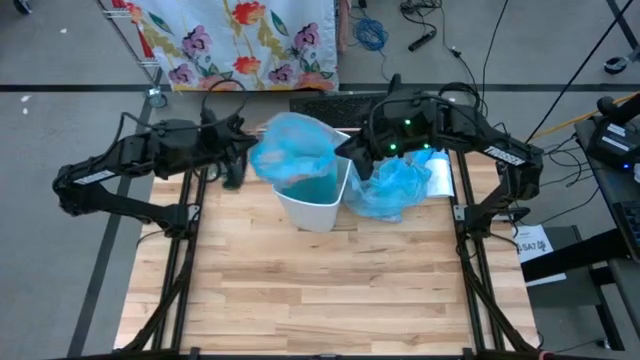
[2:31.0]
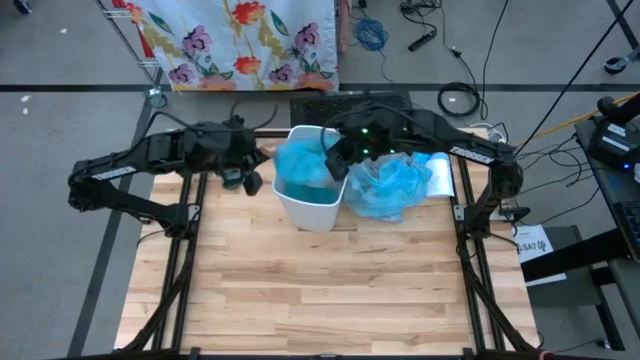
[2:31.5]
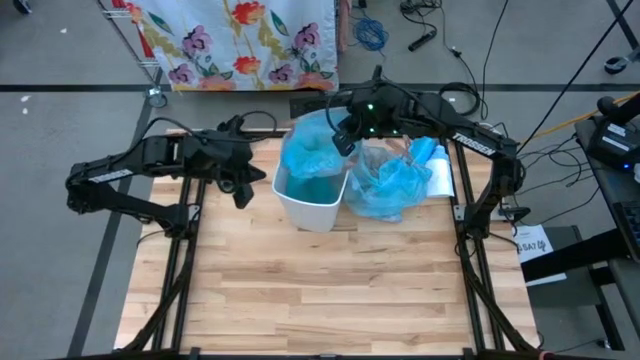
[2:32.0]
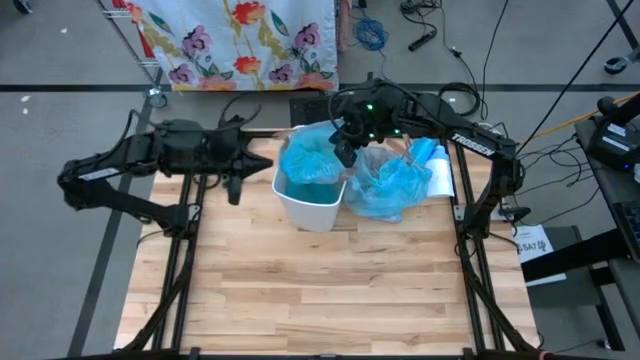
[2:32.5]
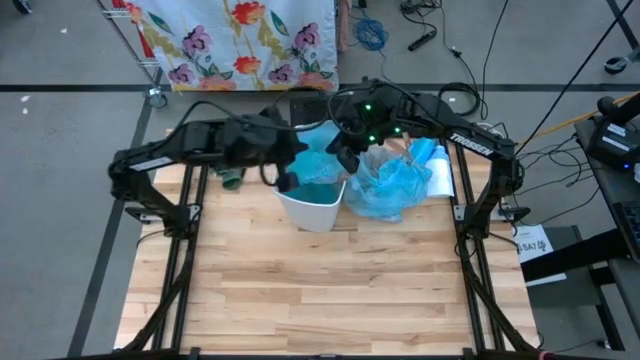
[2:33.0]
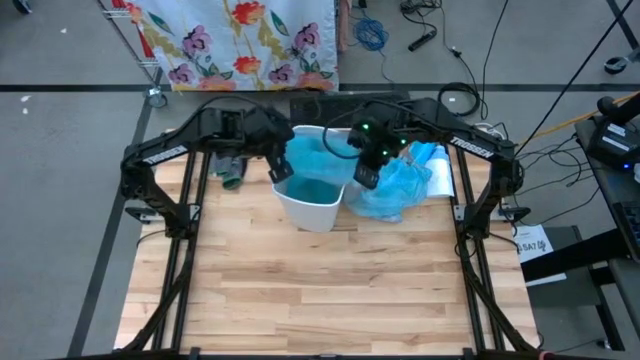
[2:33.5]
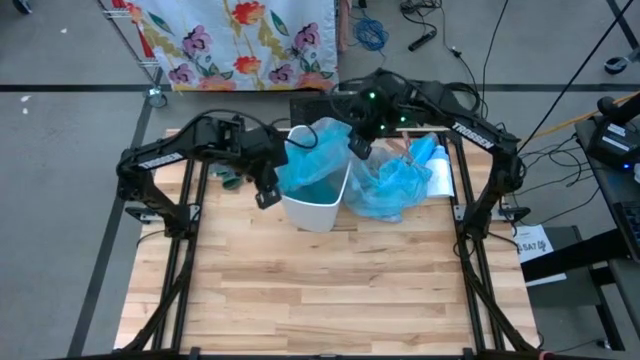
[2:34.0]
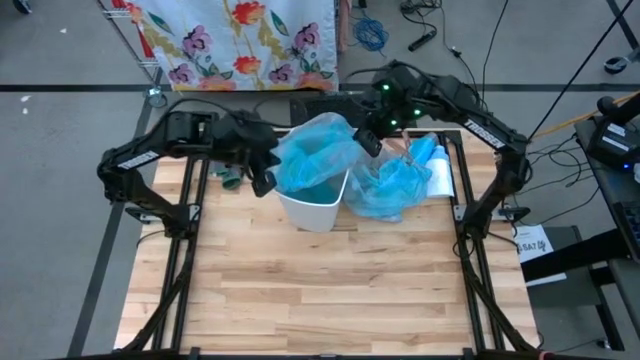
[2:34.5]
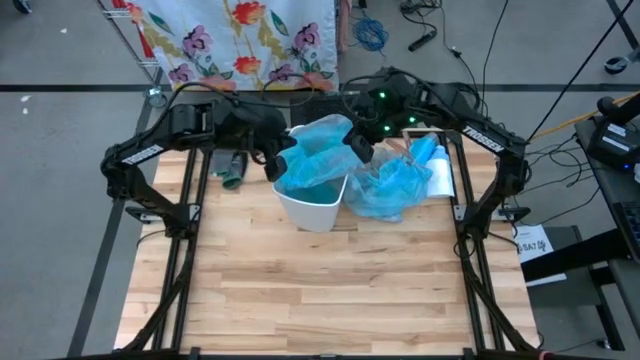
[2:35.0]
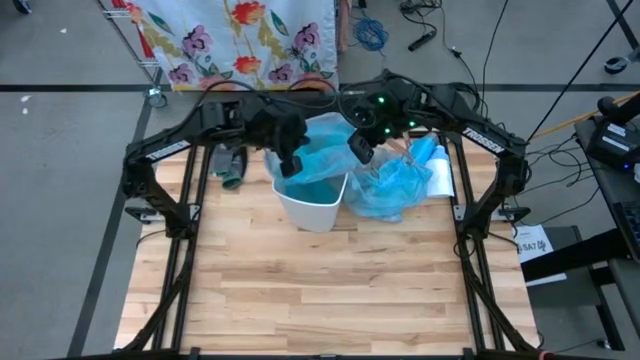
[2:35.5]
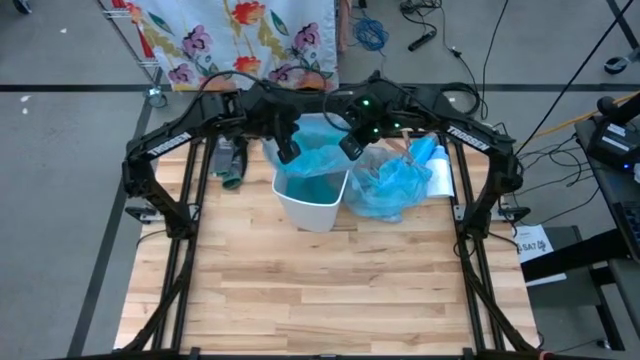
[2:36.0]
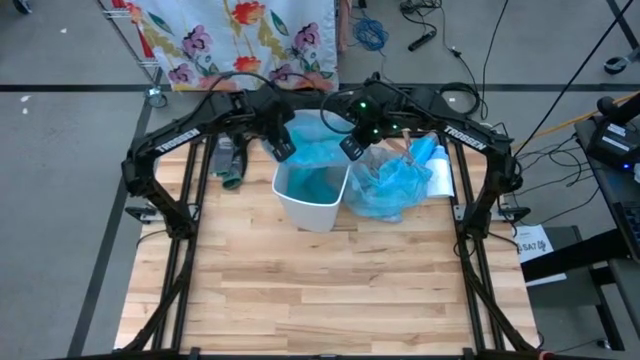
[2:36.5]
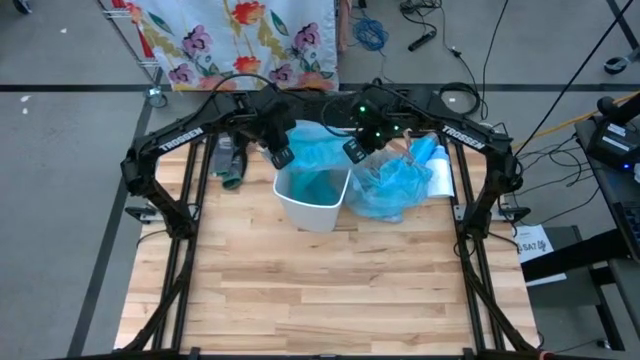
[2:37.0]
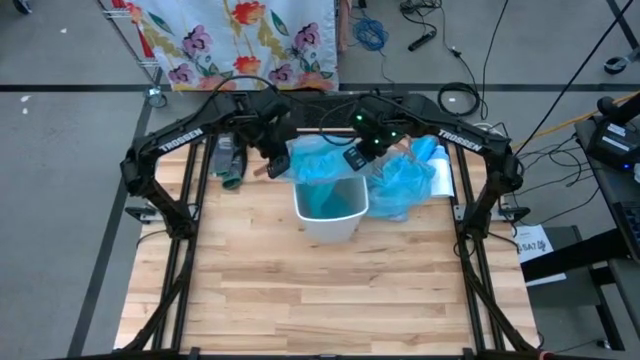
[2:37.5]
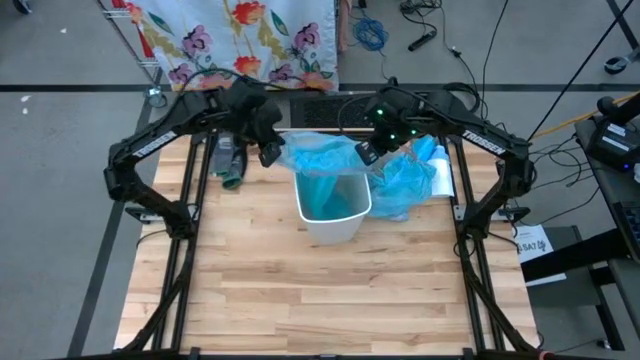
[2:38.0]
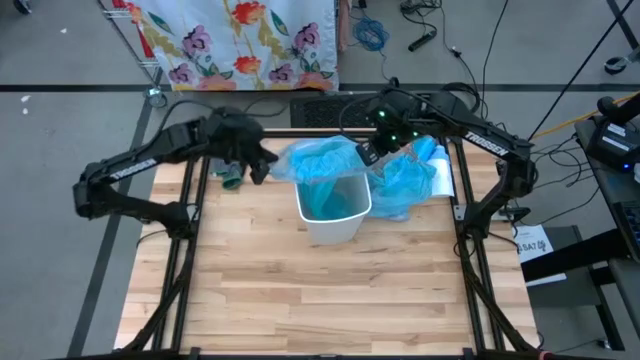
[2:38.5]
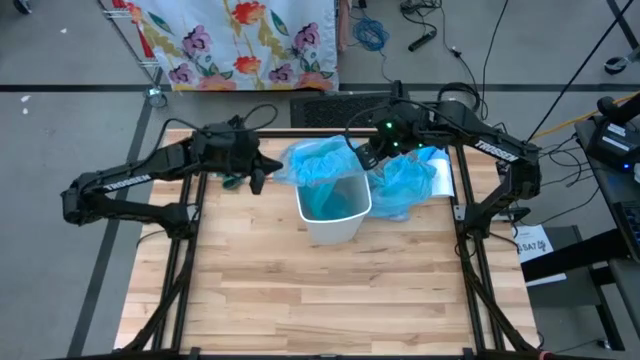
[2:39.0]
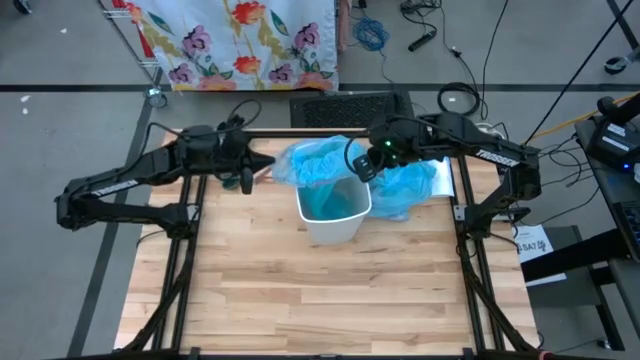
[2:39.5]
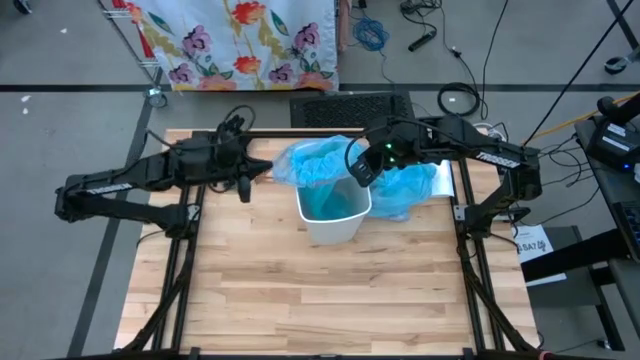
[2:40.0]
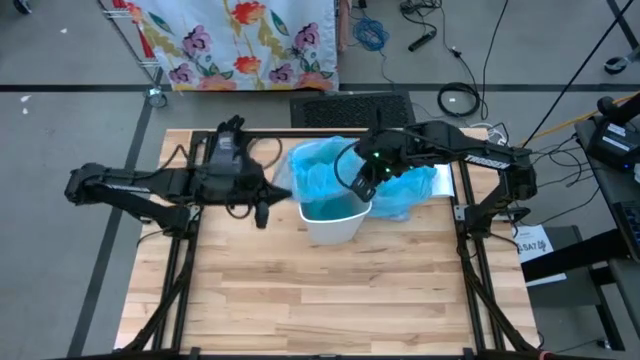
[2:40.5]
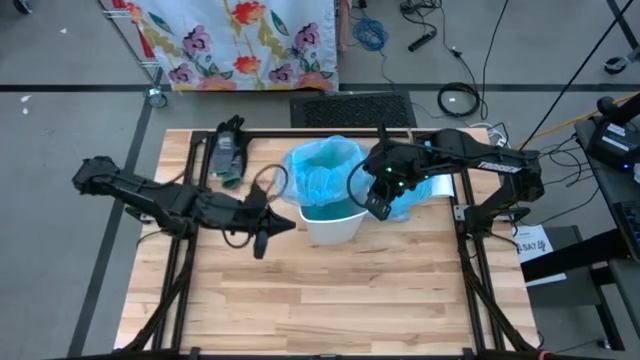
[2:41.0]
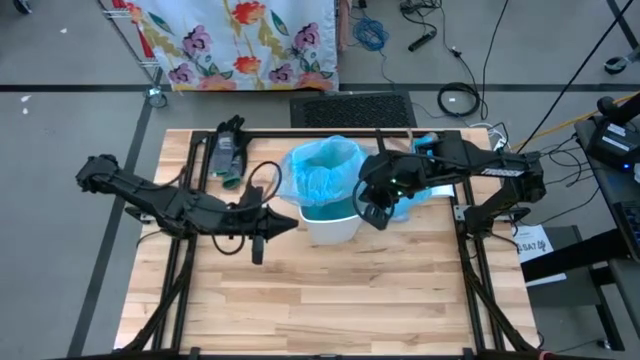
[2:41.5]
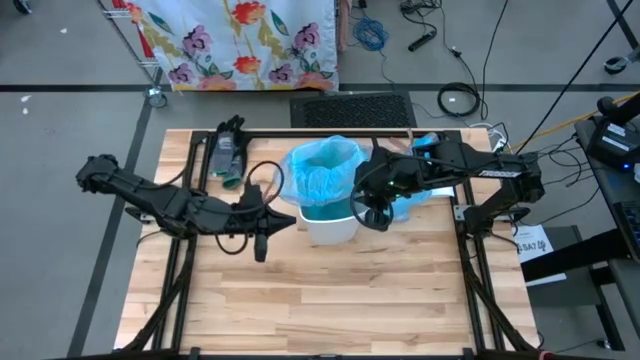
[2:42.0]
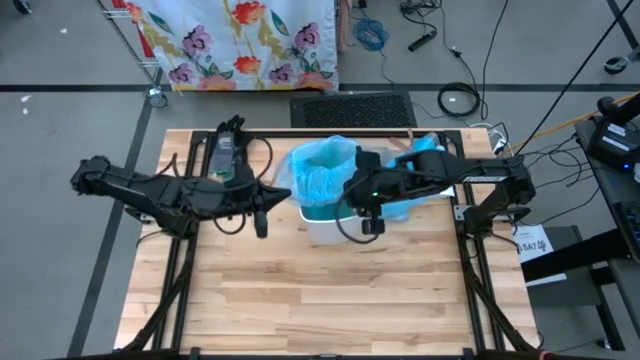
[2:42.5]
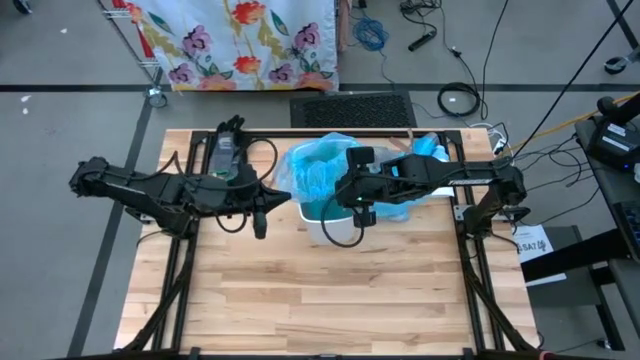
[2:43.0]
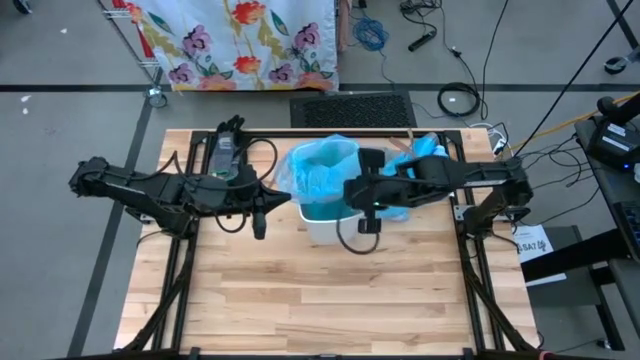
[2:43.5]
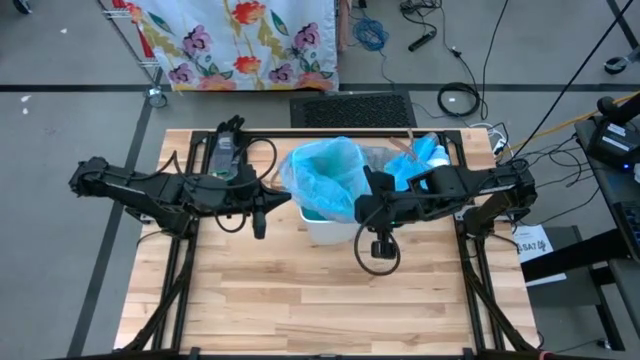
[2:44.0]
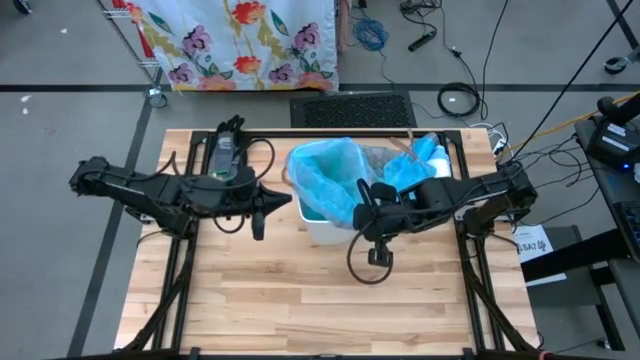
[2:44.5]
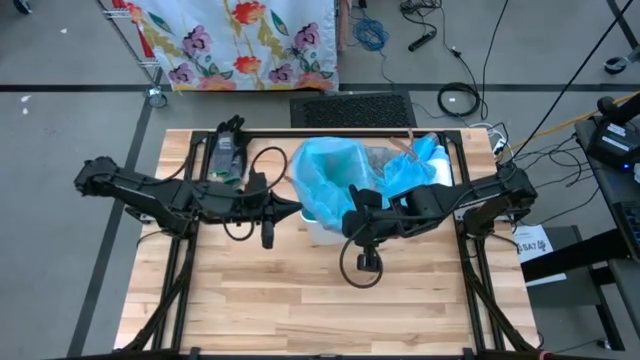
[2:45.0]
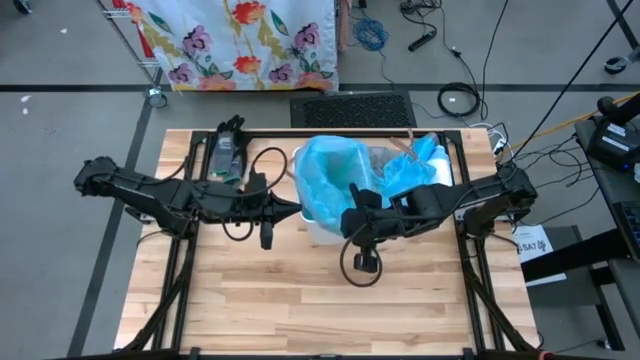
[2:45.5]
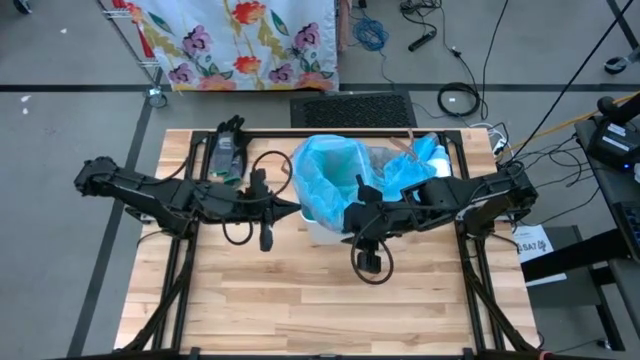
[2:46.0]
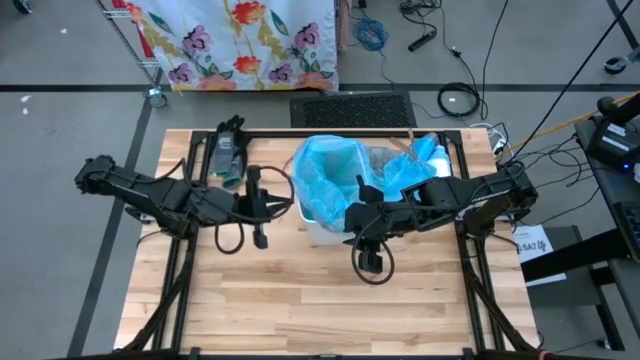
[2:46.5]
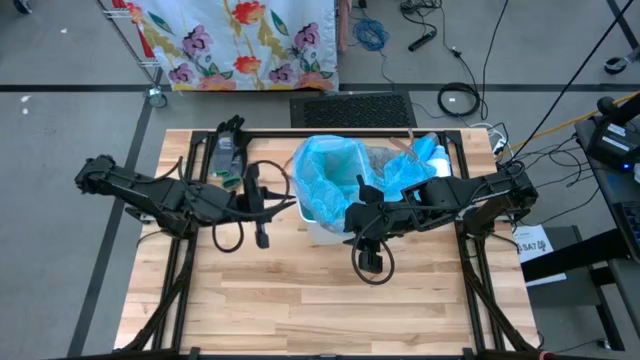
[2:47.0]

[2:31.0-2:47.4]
Task: place trash/remove bag and relplace
Insert the new blue trash bag into the trash bin

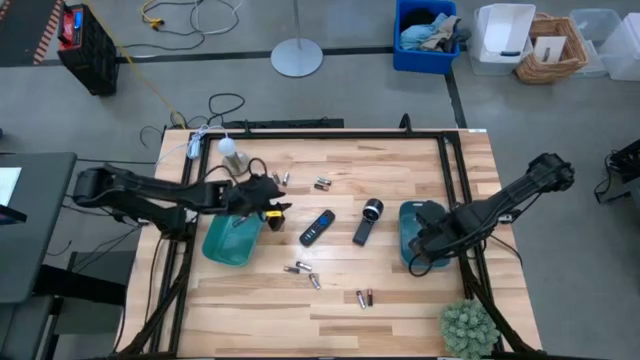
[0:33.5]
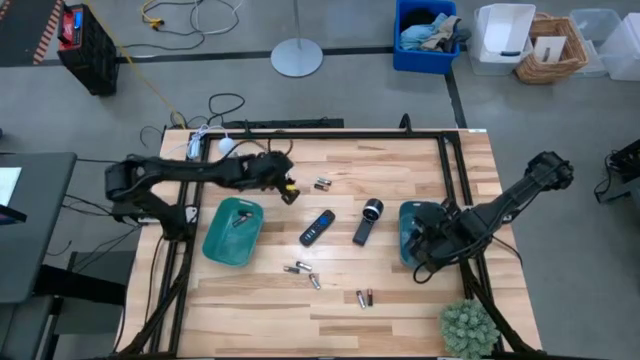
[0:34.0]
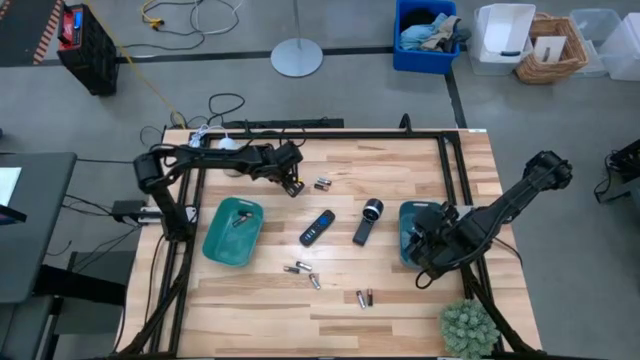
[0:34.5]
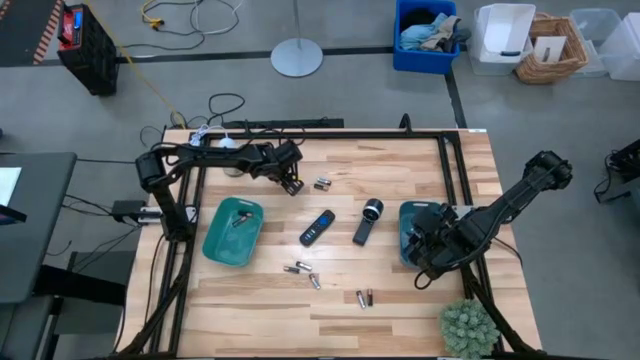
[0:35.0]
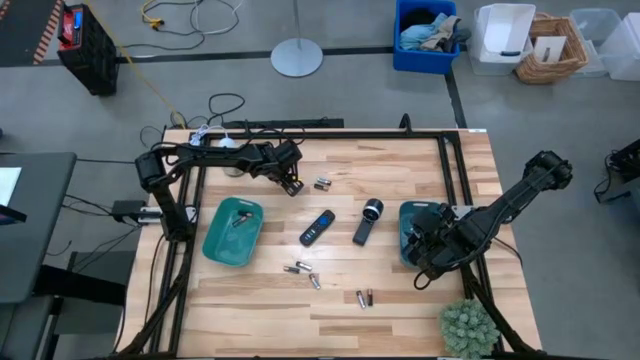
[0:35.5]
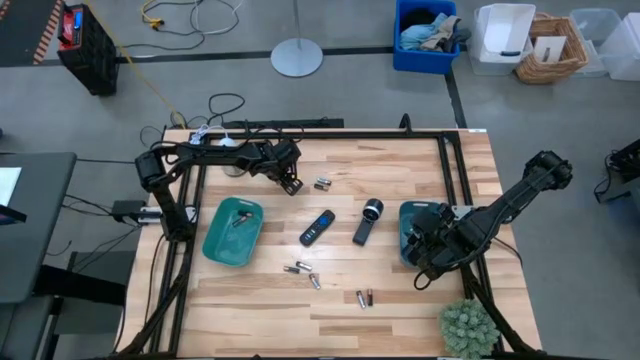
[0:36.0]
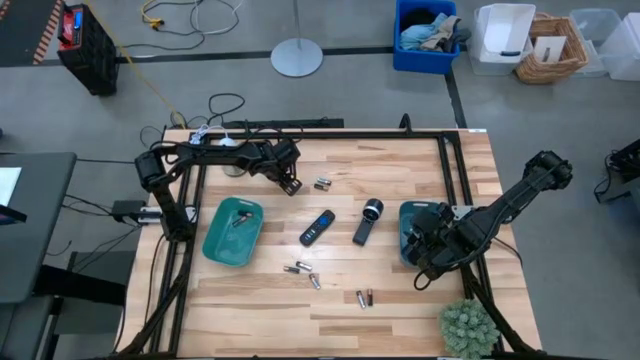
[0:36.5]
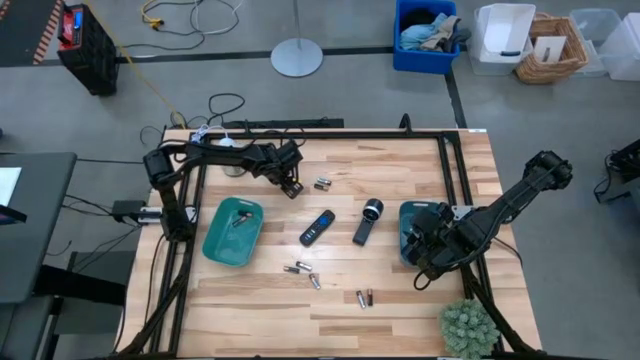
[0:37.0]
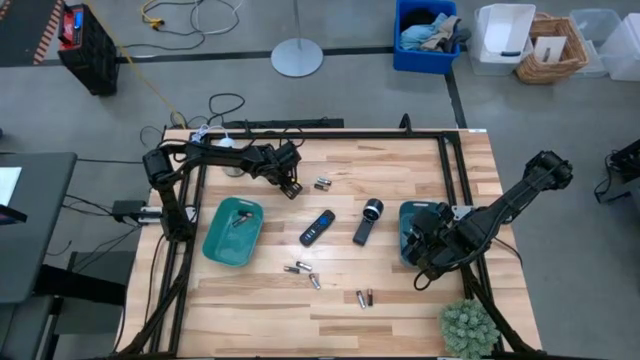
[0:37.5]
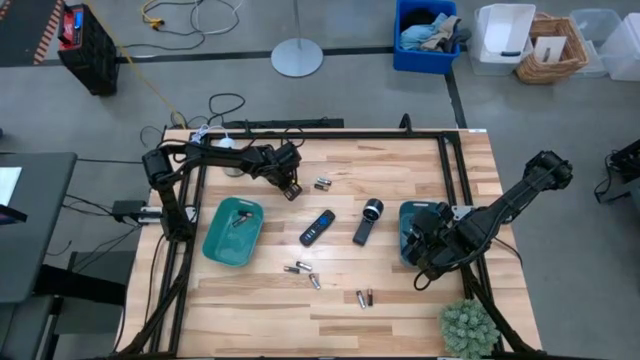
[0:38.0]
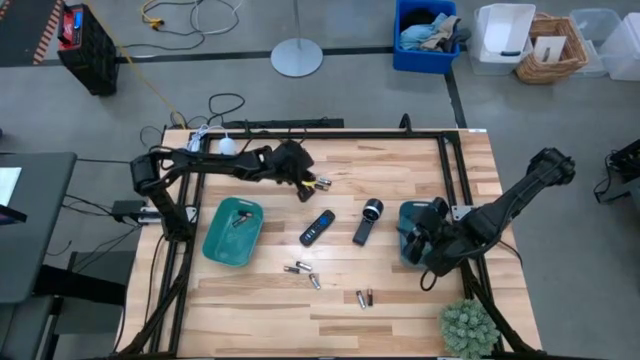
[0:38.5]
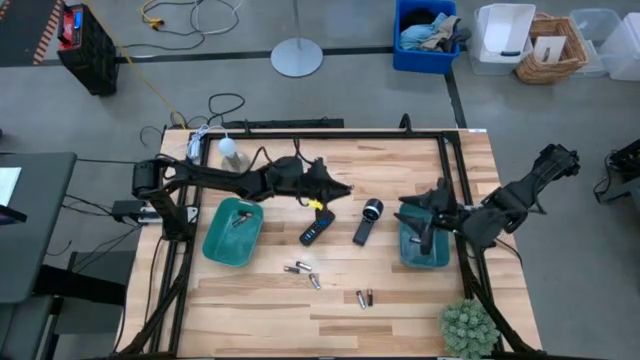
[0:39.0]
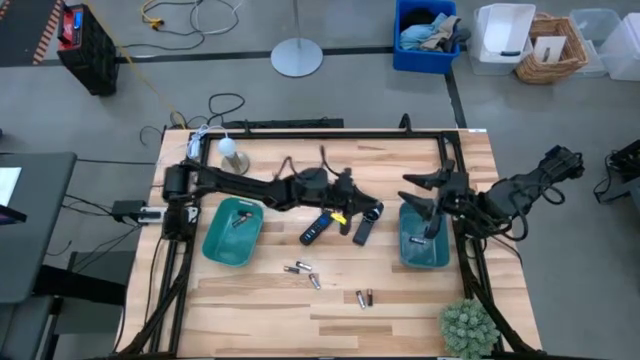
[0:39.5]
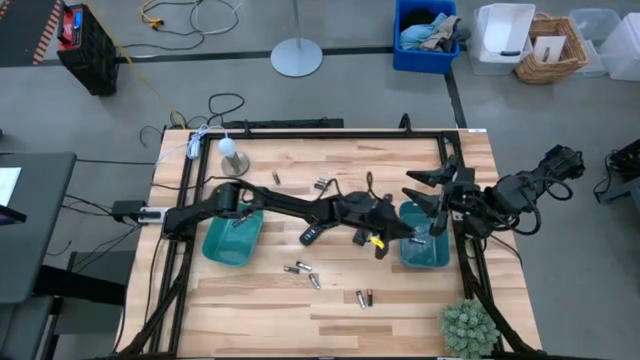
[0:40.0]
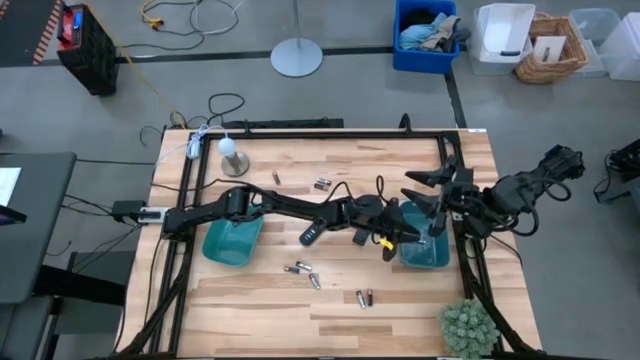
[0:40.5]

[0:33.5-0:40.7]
Task: Sort batteries
Put the silver battery into the blue bin
